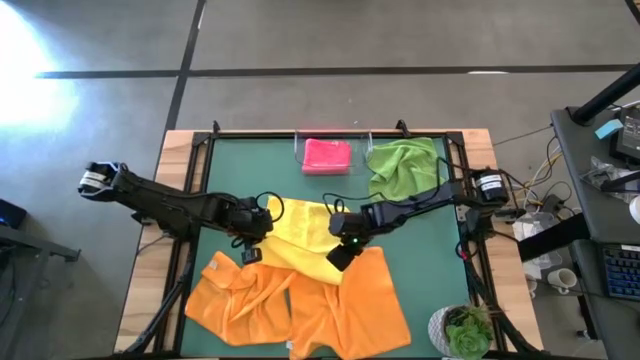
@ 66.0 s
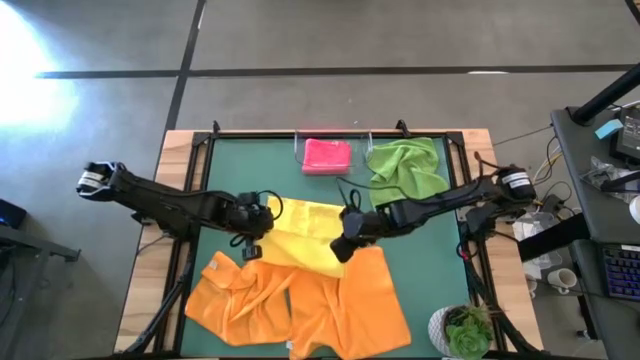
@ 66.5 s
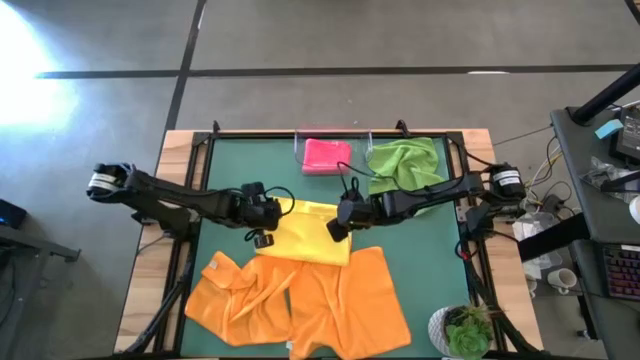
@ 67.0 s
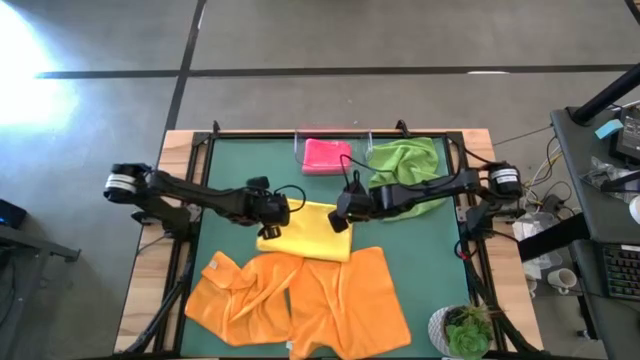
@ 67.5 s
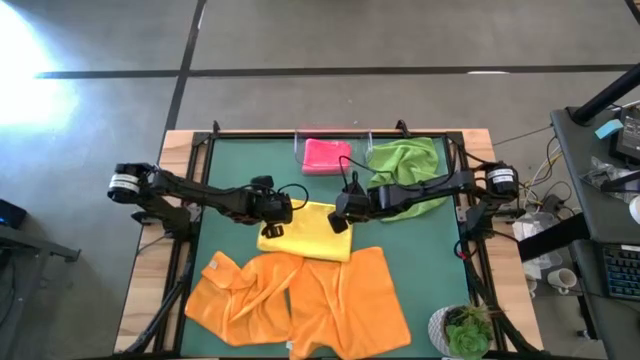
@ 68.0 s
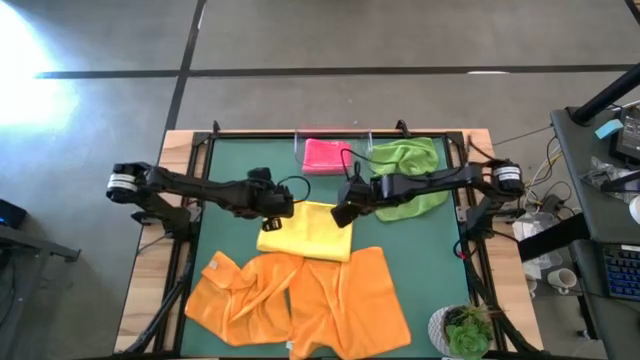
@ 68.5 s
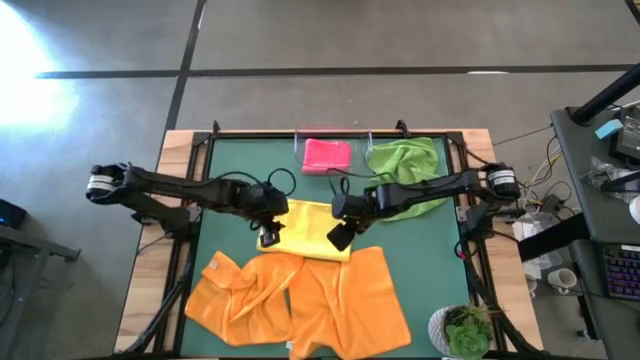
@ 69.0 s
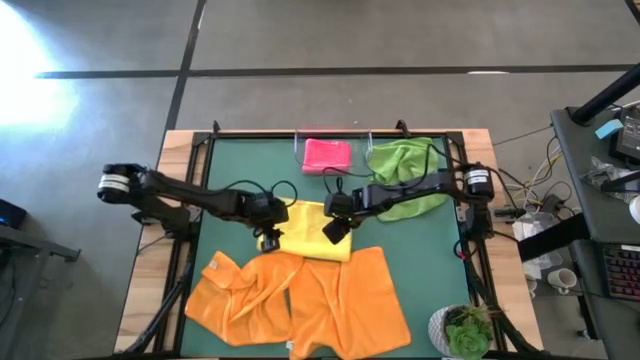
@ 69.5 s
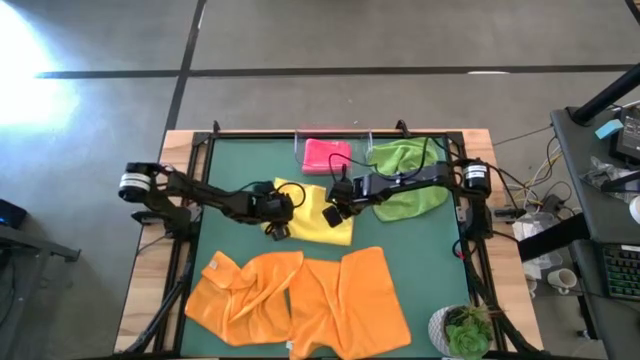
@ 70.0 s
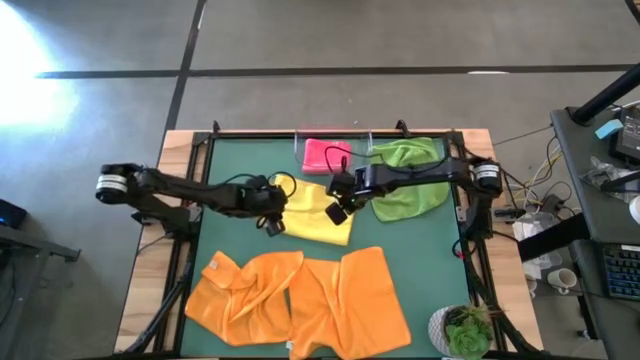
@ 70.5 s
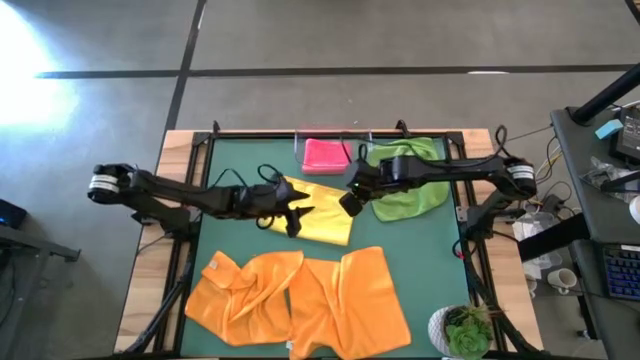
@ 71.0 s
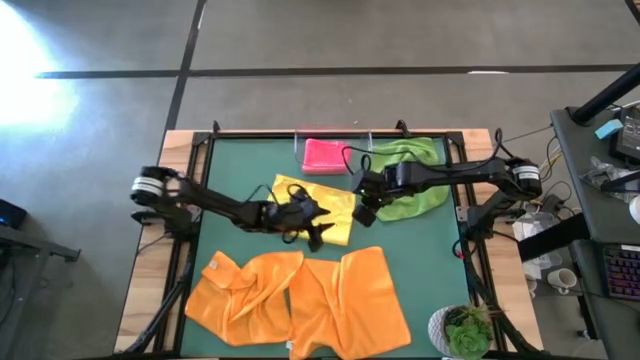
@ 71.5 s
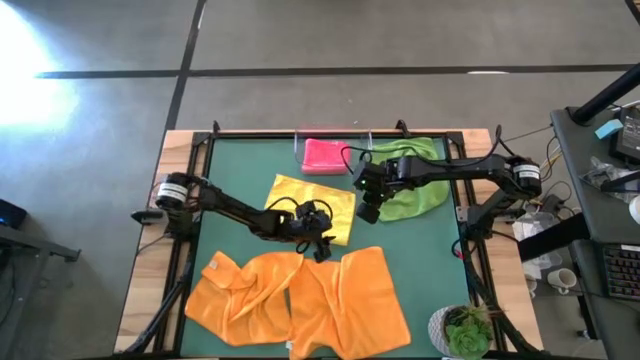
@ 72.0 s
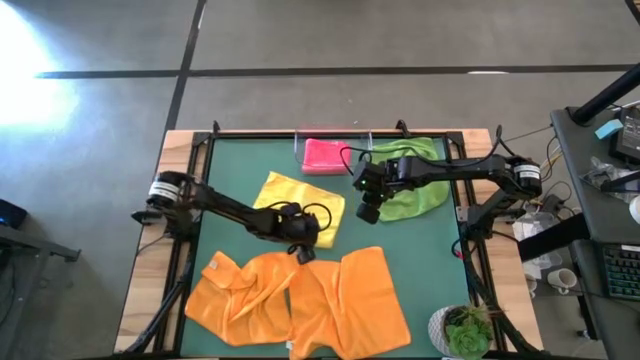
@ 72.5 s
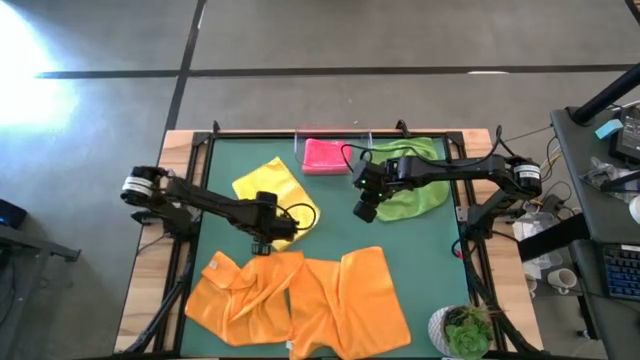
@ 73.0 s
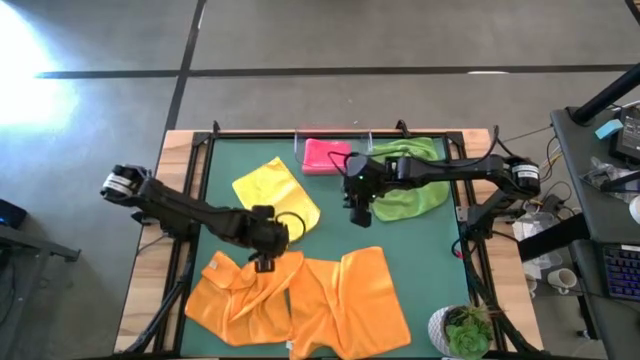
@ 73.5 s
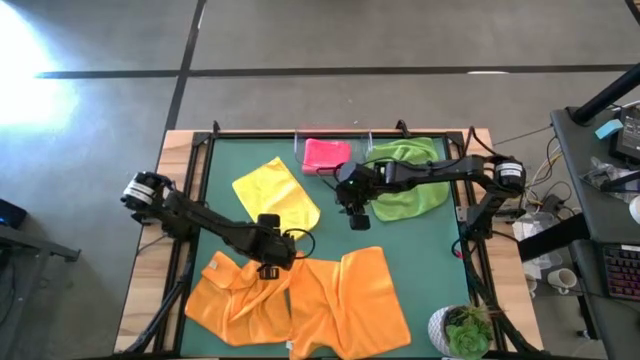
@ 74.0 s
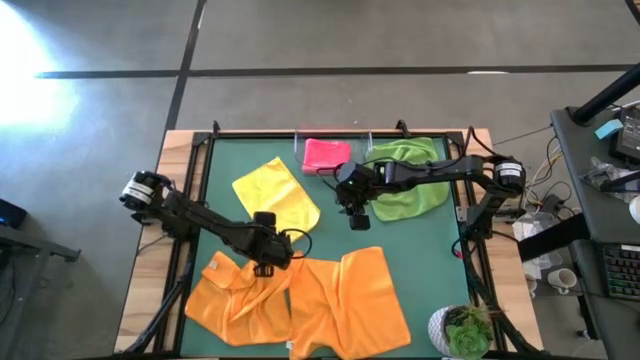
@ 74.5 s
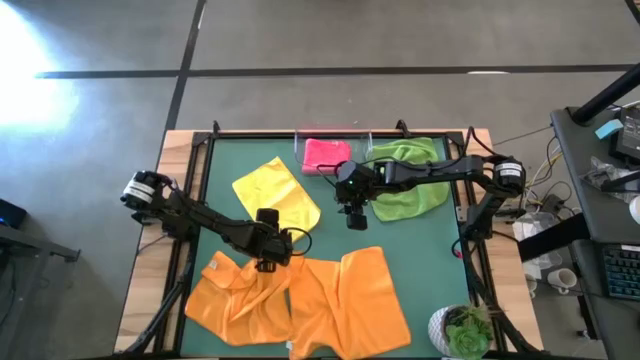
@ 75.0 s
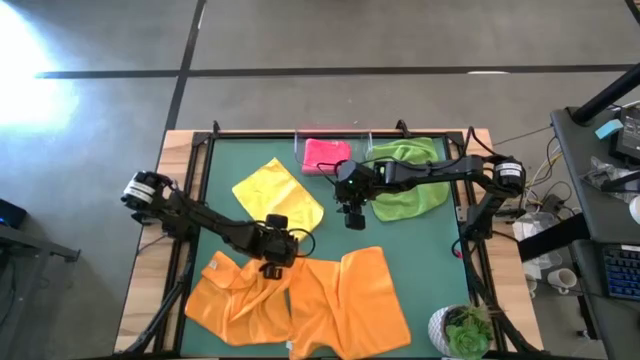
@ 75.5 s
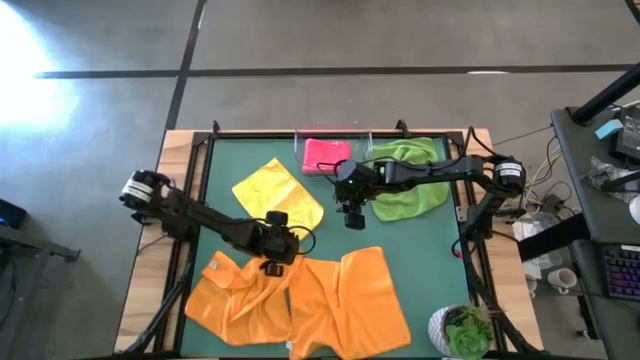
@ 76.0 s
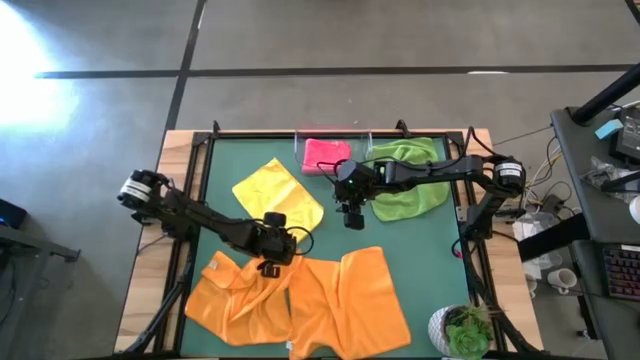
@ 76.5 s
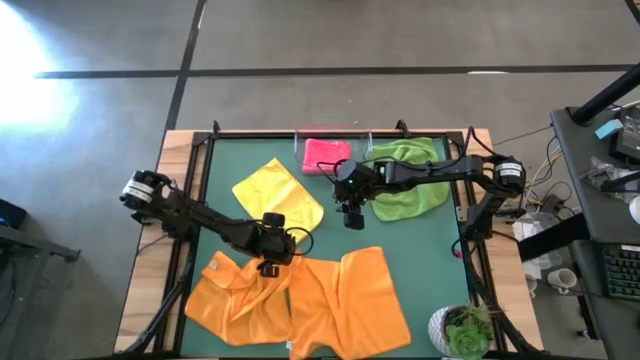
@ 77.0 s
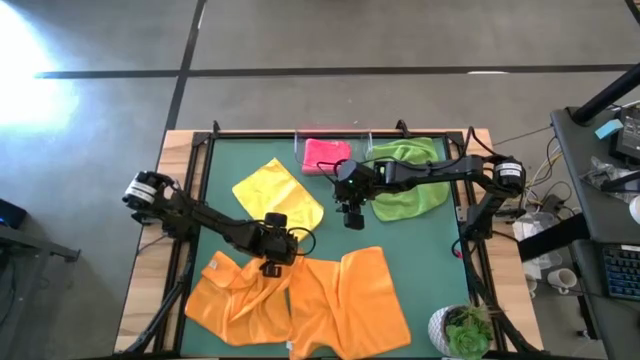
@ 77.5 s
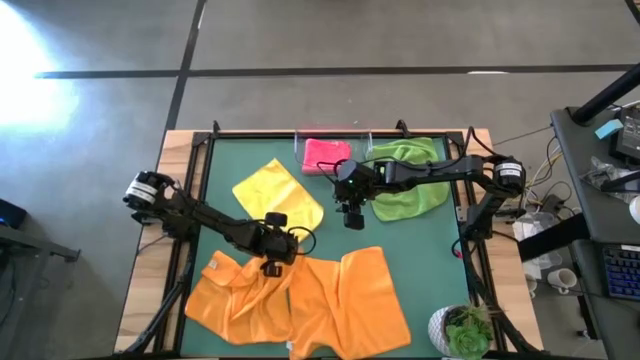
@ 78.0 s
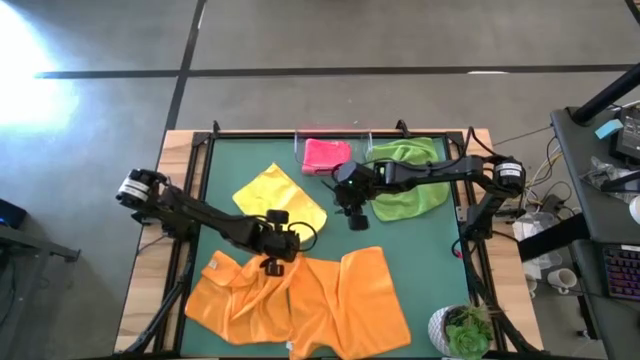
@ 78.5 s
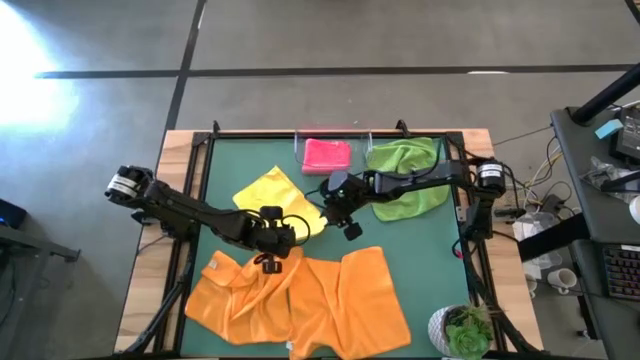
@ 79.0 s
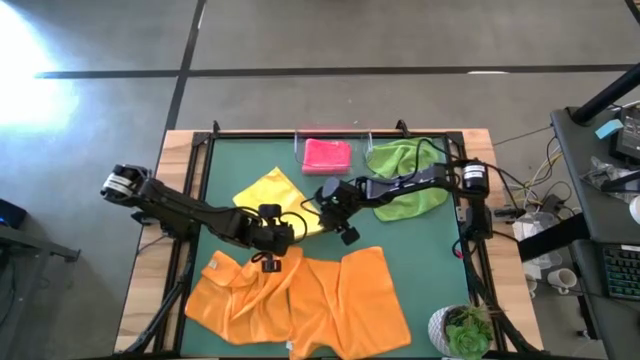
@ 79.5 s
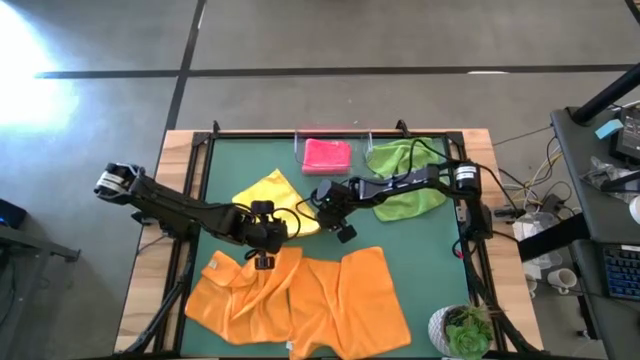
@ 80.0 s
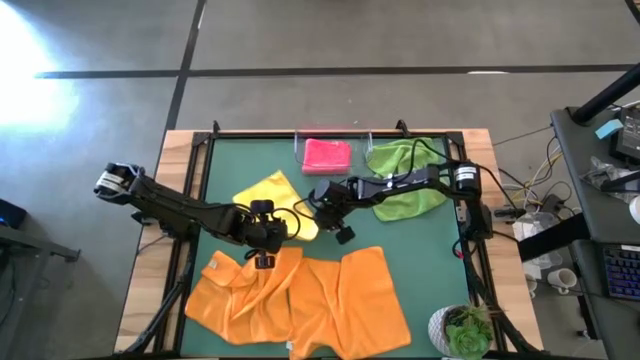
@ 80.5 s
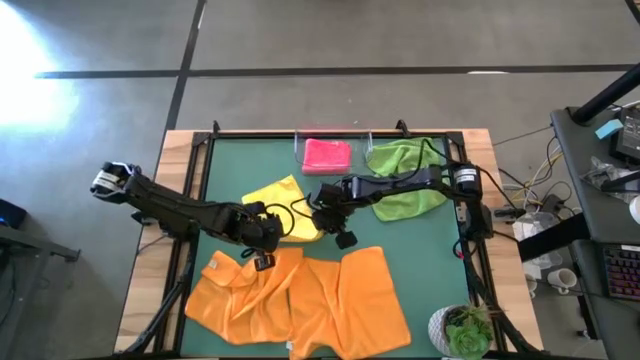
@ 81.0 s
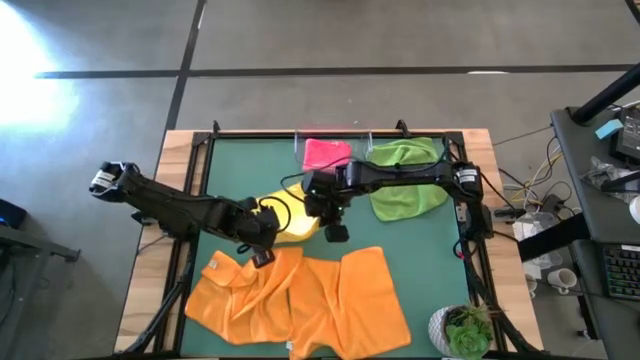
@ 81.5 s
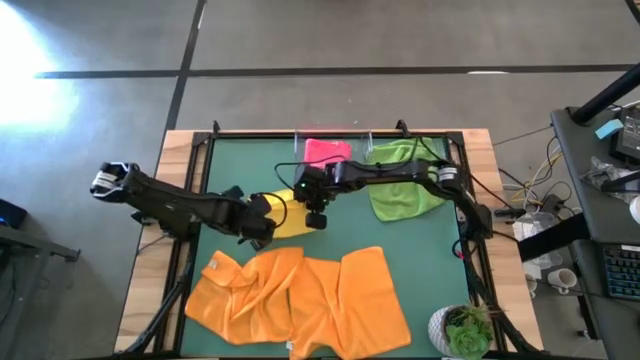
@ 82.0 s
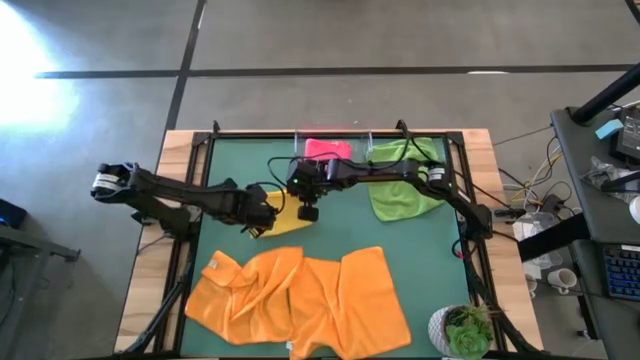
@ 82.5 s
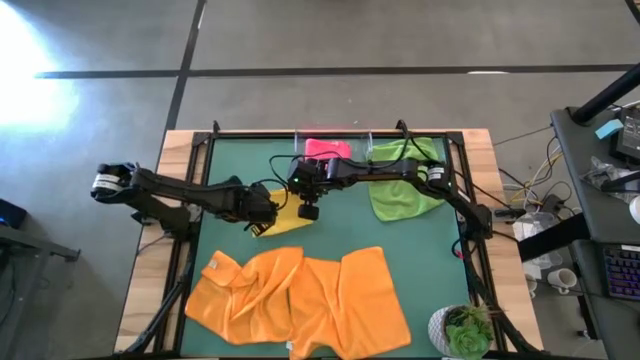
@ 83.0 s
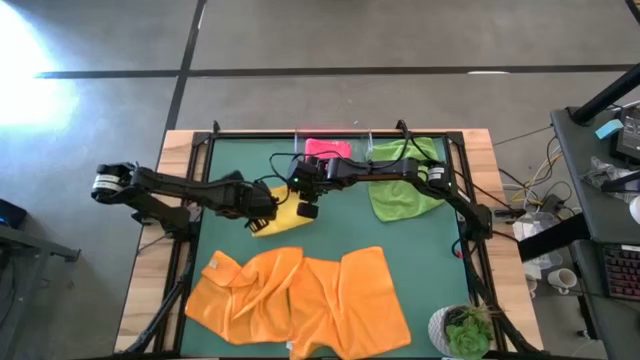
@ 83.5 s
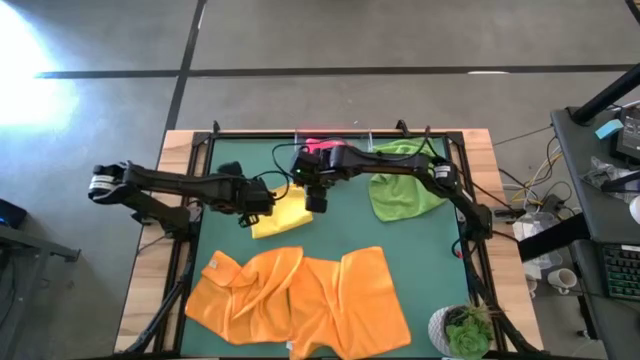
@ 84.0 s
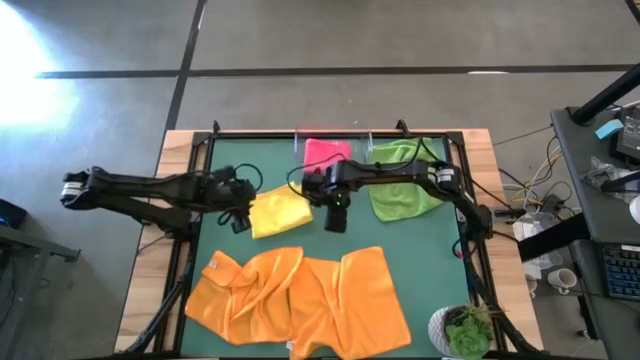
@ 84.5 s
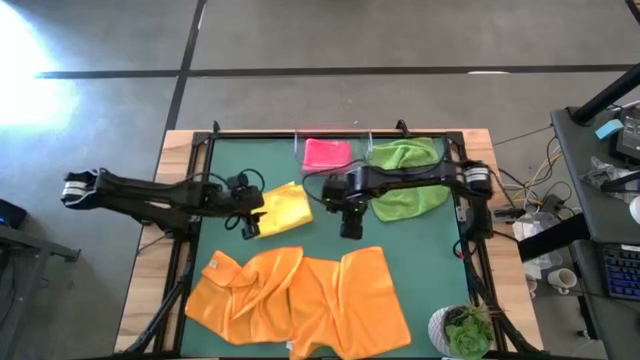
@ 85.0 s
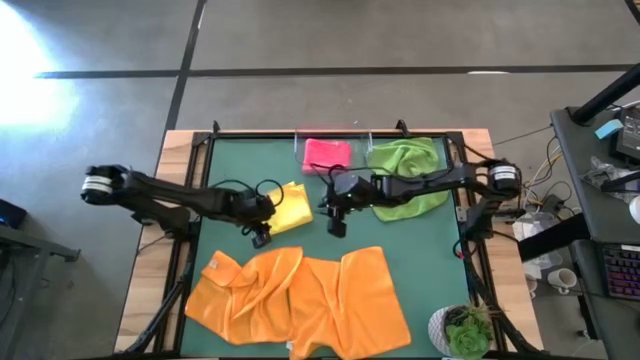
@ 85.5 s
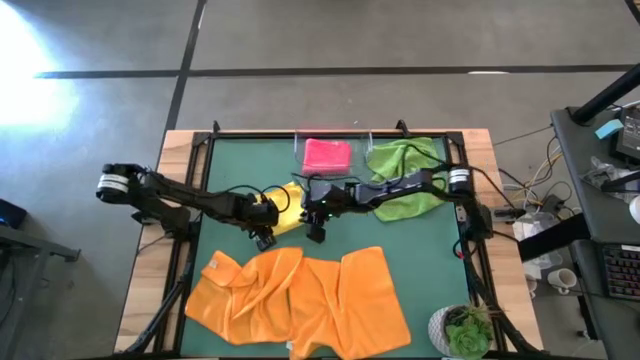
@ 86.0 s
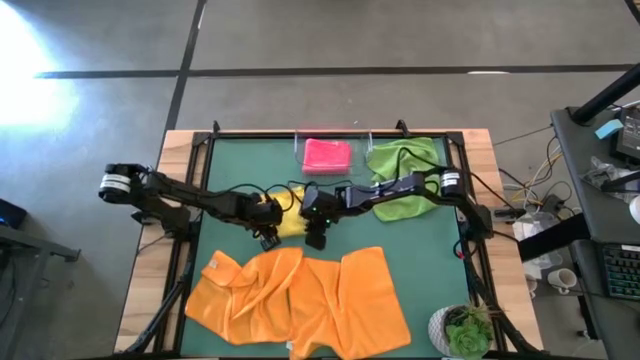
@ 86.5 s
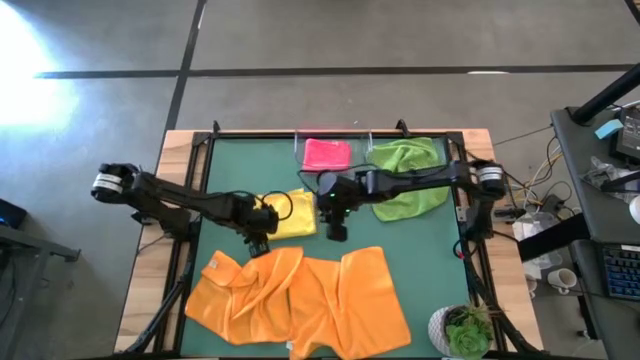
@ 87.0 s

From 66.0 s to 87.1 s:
Task: Fold microfiber towels
Fold the yellow microfiber towel
